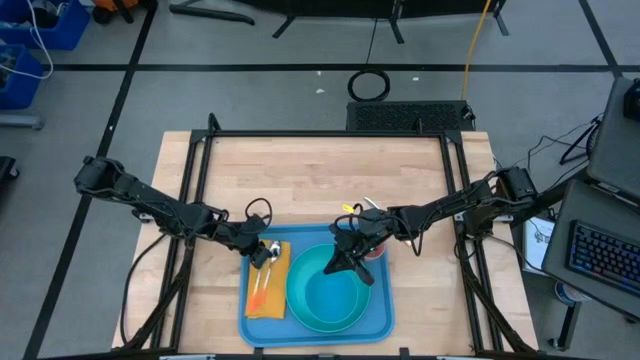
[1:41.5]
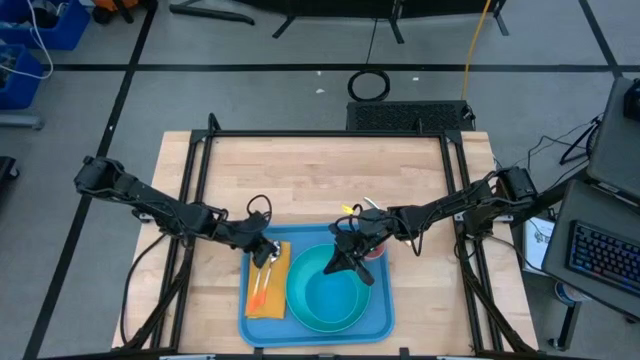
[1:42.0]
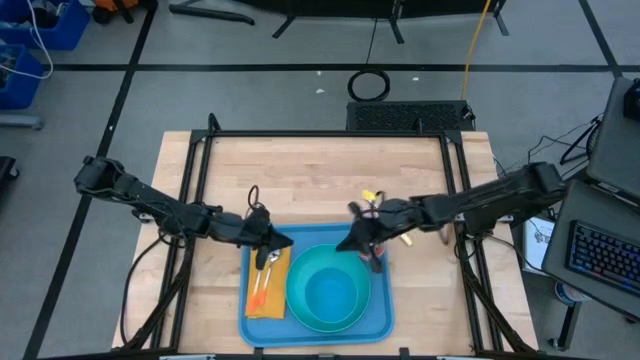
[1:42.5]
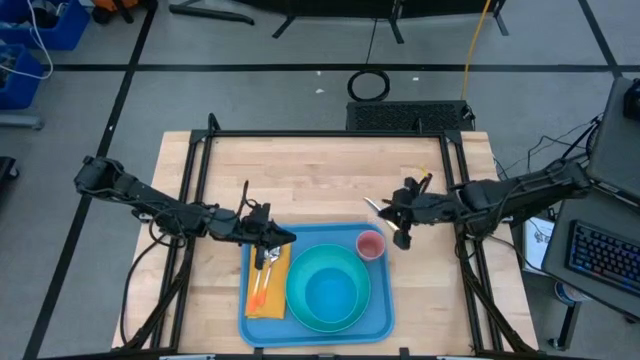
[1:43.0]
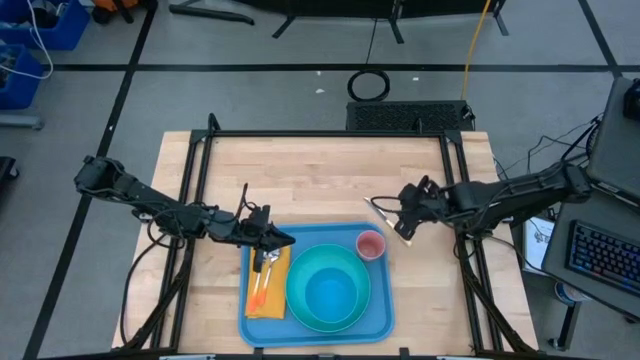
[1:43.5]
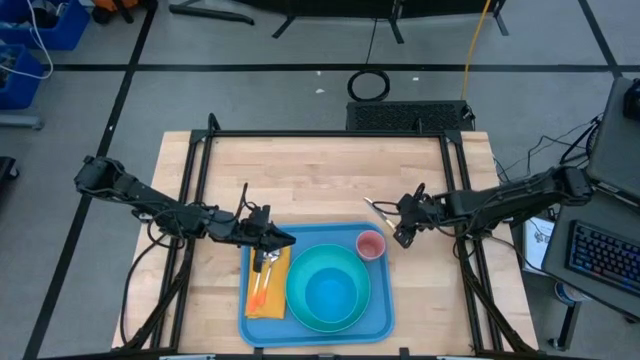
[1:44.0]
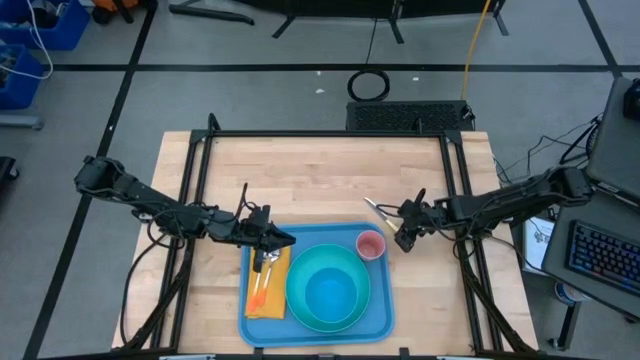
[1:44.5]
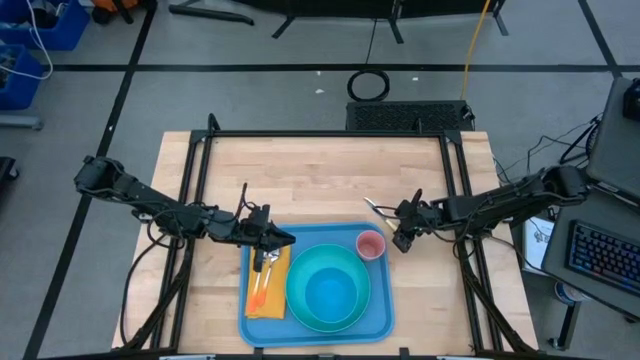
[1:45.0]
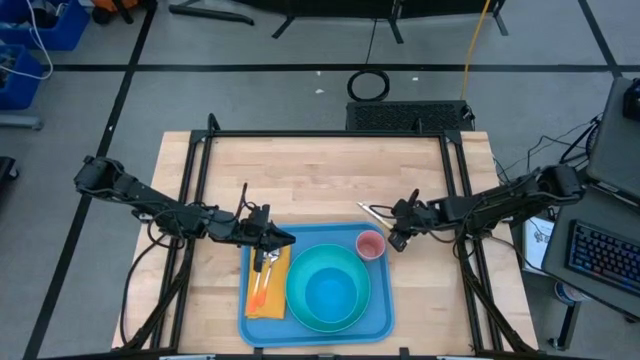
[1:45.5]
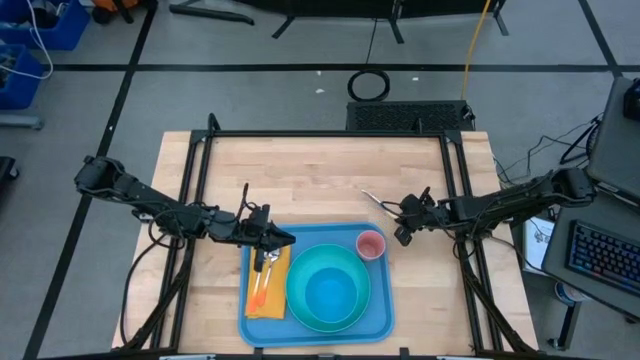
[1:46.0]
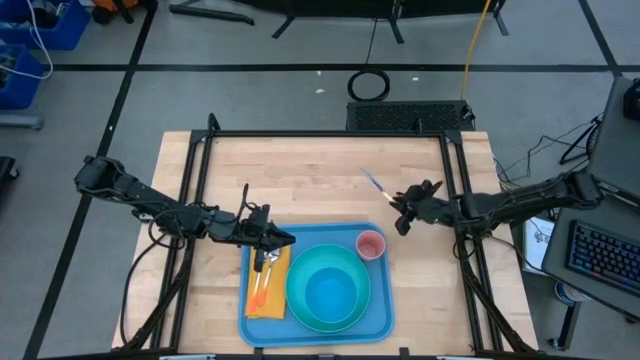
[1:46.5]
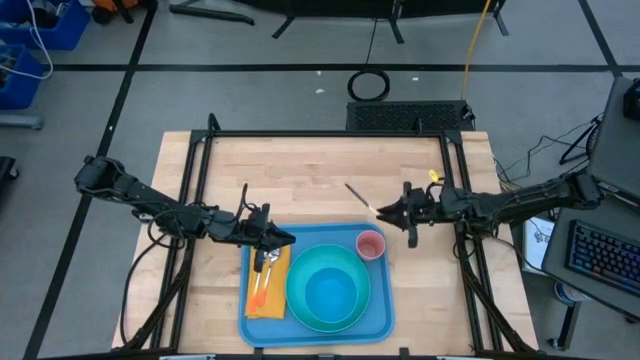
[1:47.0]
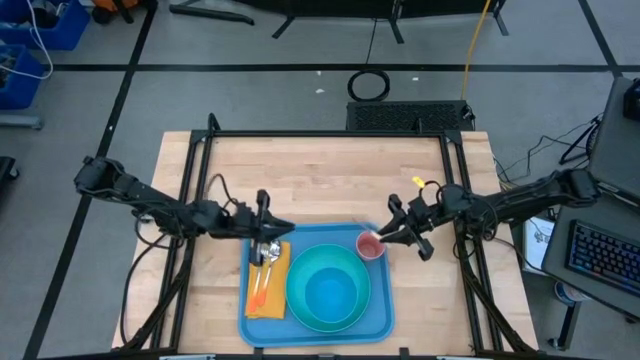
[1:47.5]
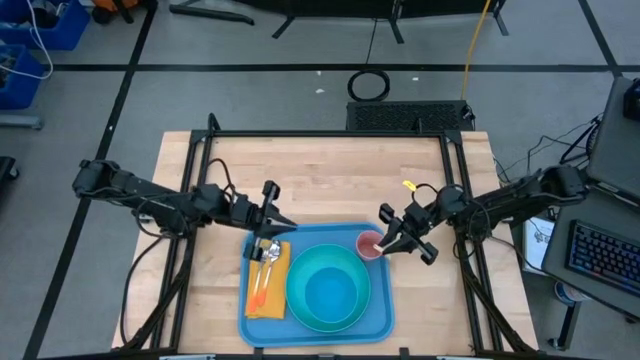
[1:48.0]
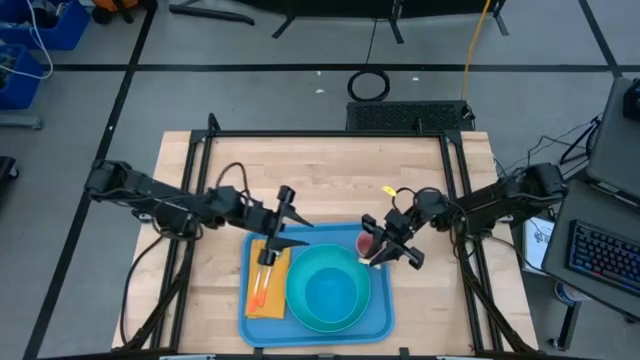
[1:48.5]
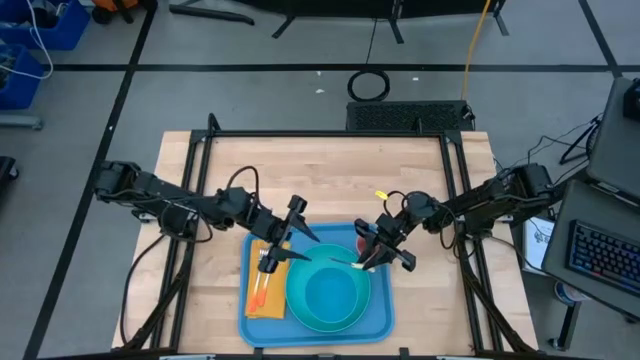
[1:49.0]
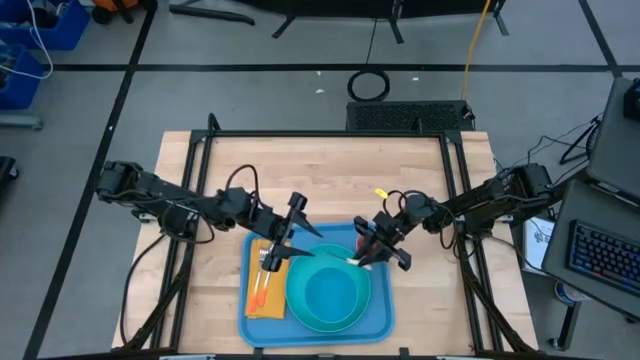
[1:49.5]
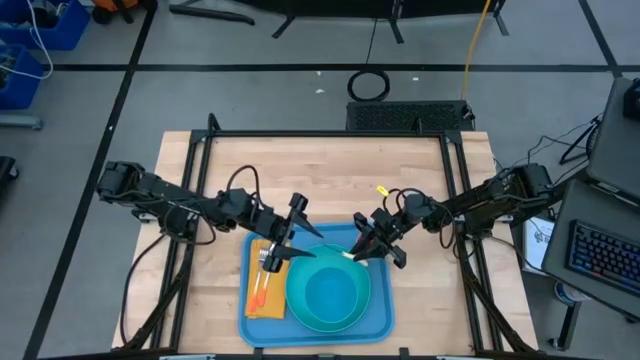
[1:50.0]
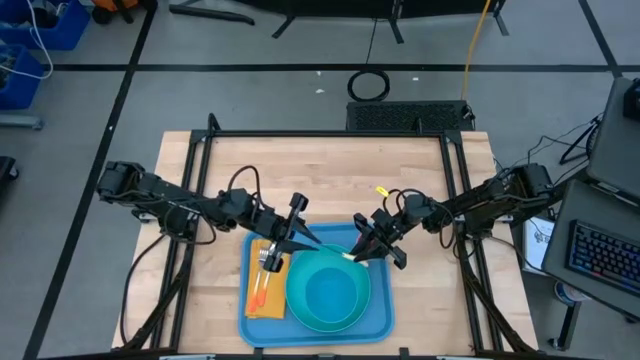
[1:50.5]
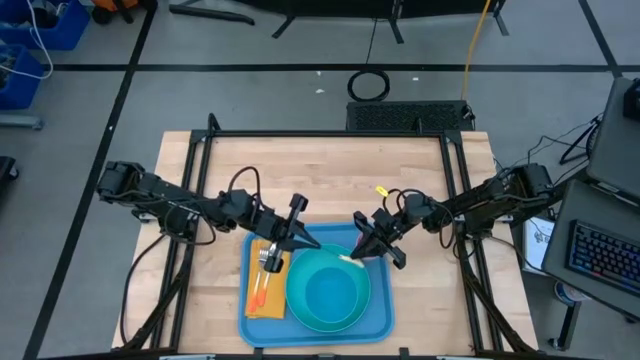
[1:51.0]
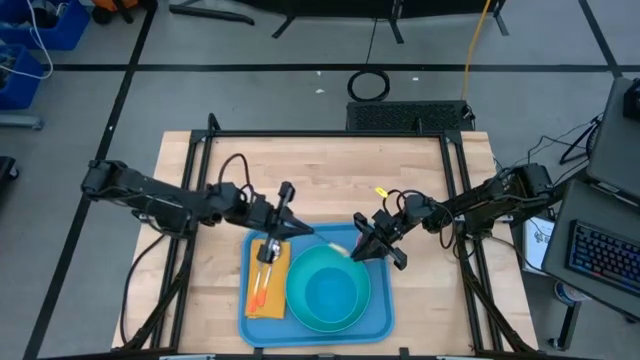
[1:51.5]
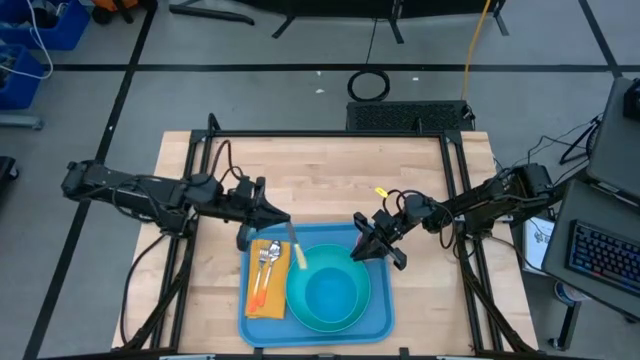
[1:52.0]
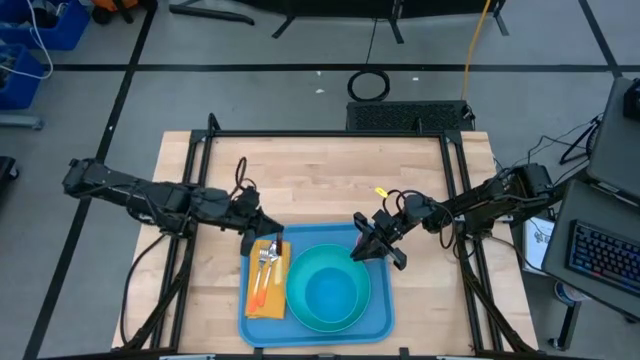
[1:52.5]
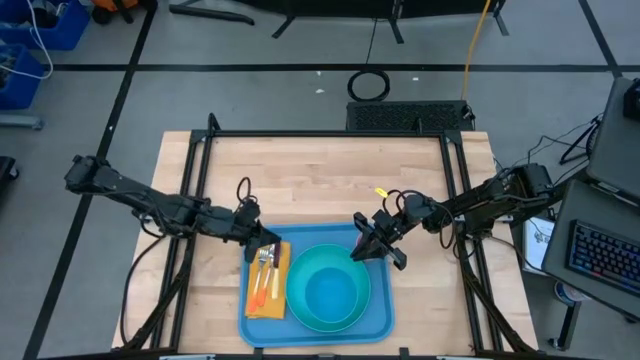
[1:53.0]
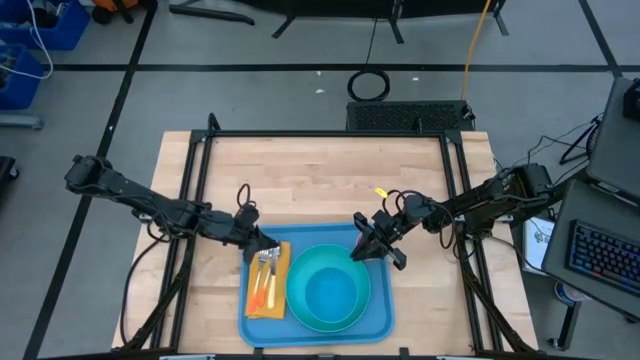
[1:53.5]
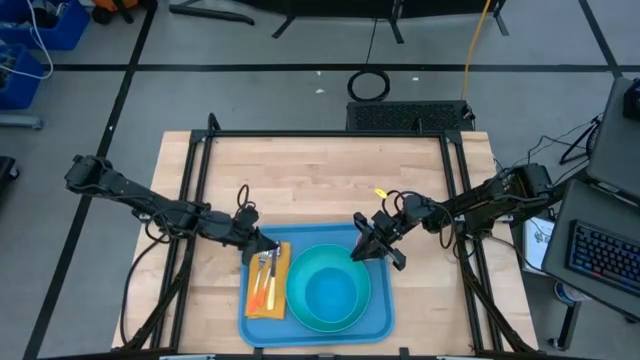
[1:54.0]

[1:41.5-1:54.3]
Task: Set up tray
Put the white table knife on the top of the yellow table napkin to the right of the orange spoon

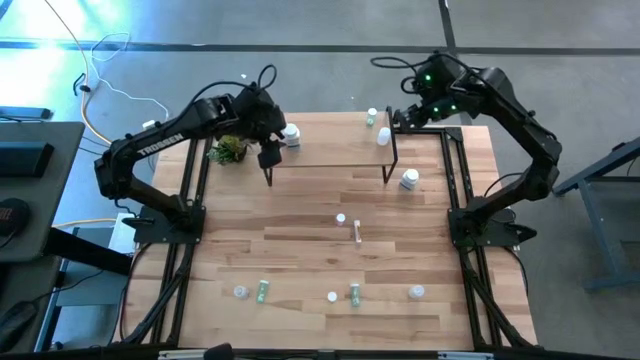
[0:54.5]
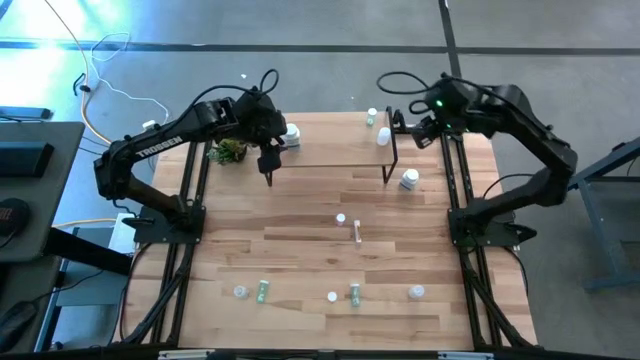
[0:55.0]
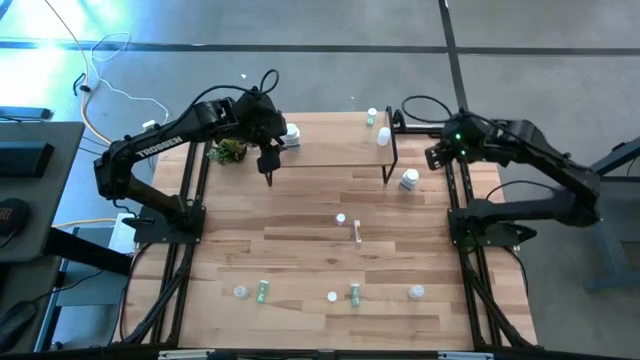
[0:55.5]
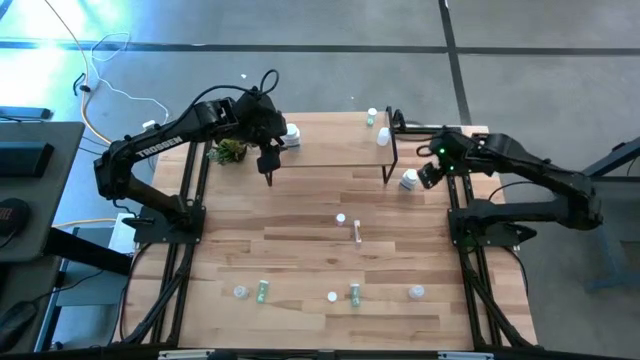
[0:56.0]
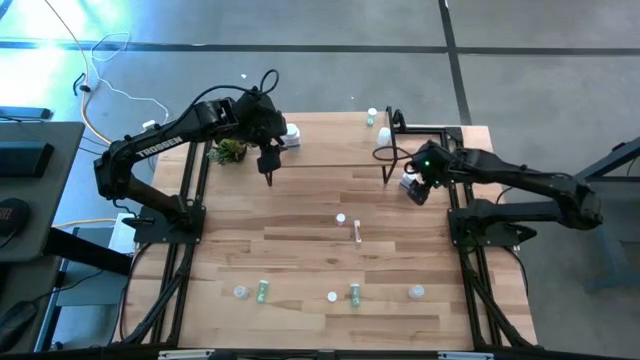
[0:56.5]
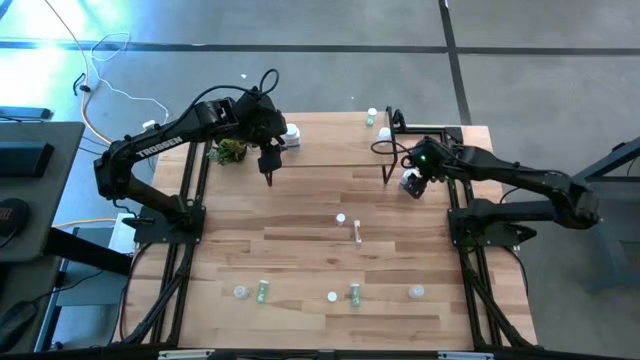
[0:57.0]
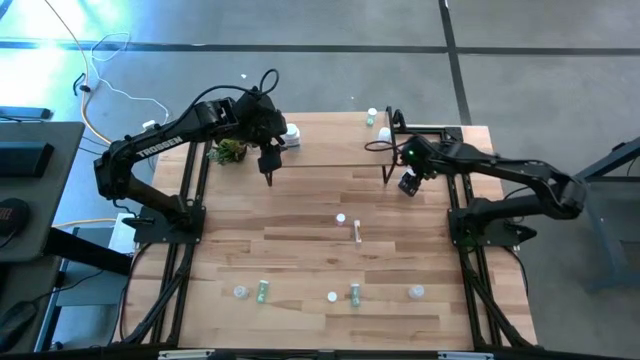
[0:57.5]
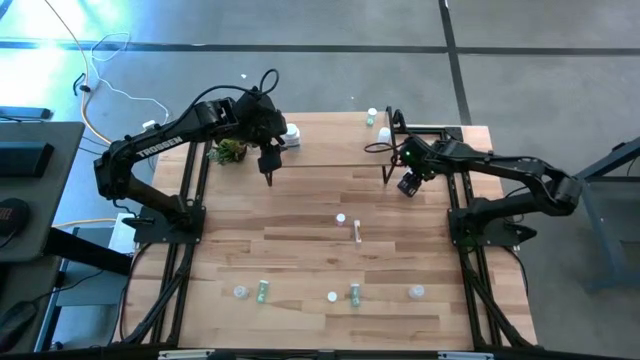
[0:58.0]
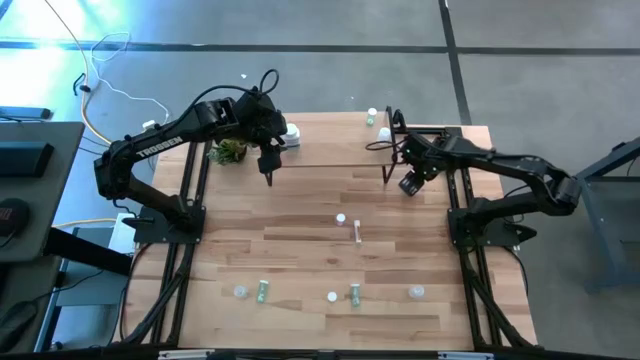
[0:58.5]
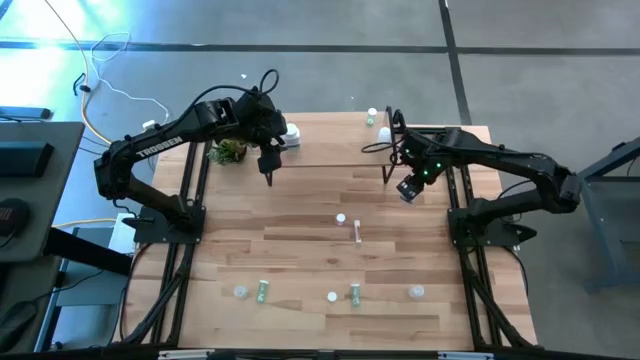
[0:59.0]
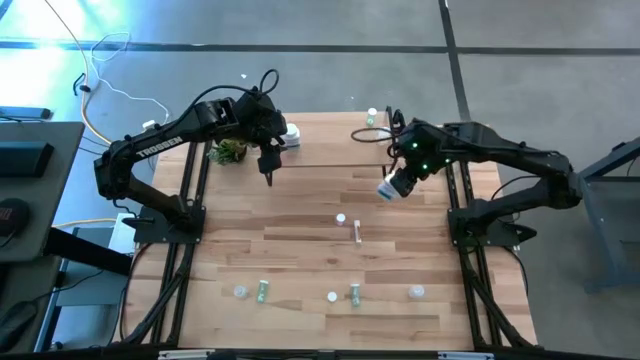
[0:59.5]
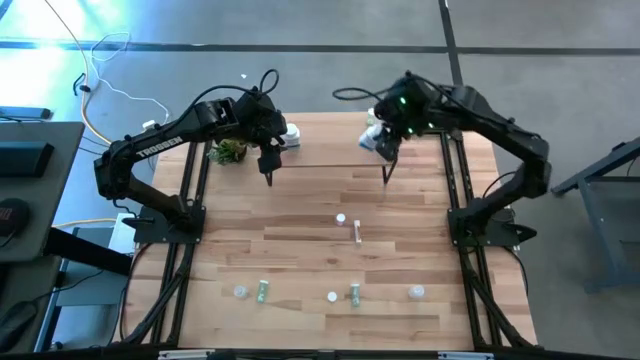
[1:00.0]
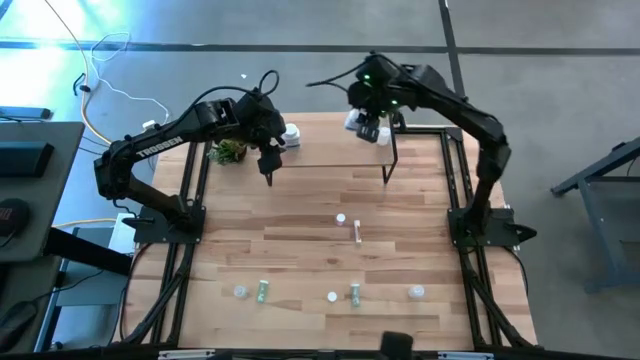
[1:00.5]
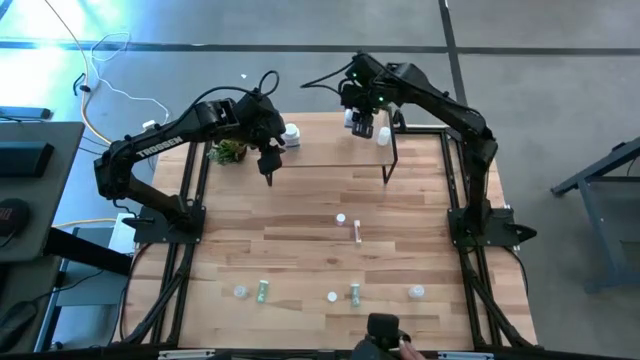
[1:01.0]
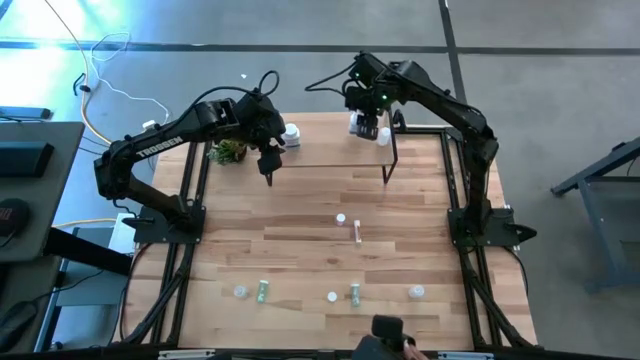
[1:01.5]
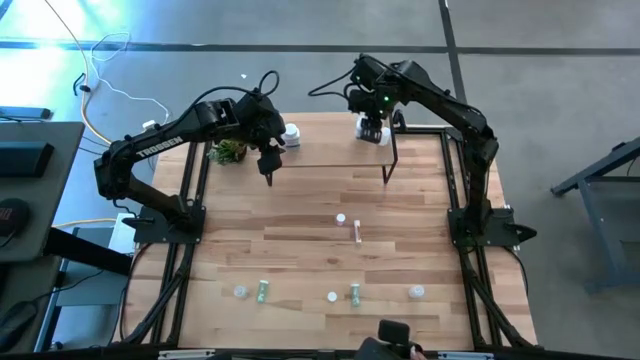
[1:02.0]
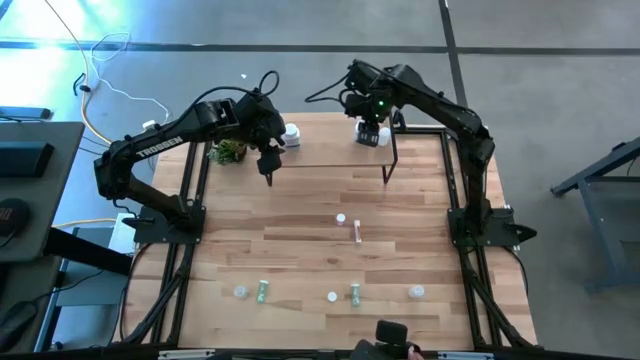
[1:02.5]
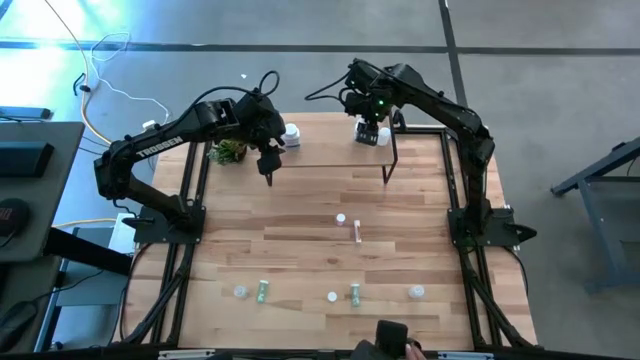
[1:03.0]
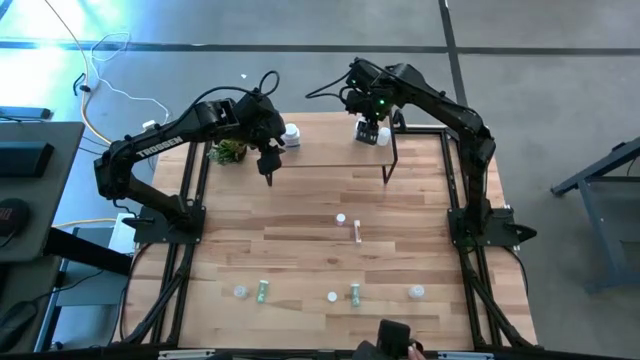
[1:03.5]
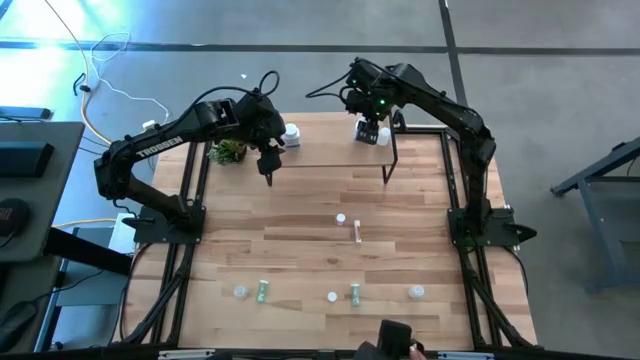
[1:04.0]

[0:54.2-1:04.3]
Task: Pick and place medicine bottles onto shelf by color
Put the white blue pill bottle on the shelf
